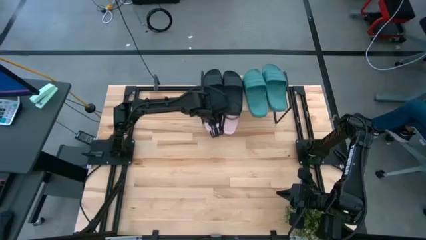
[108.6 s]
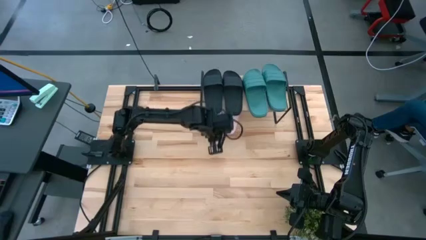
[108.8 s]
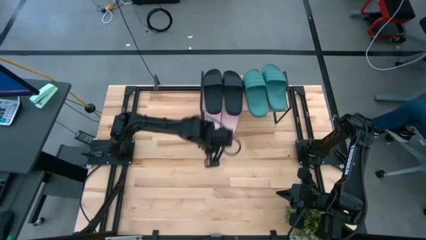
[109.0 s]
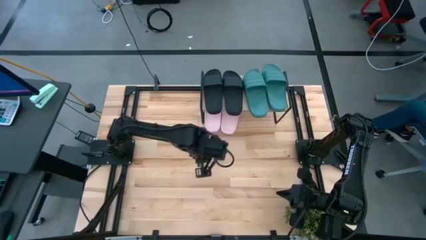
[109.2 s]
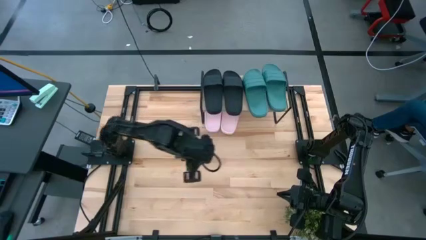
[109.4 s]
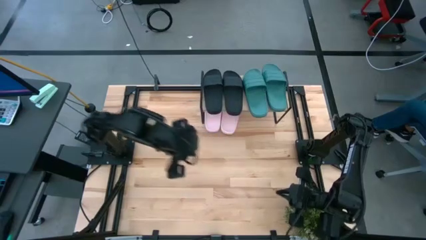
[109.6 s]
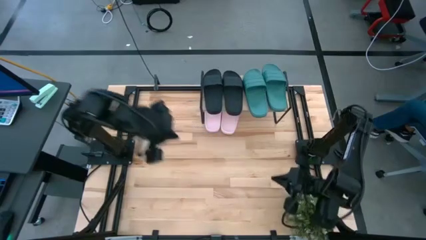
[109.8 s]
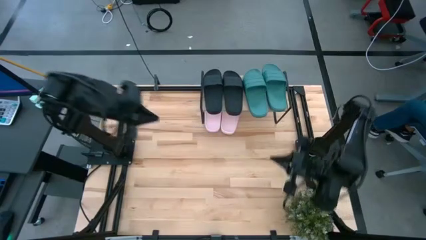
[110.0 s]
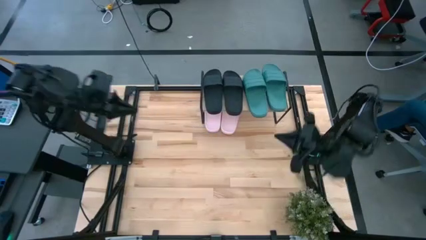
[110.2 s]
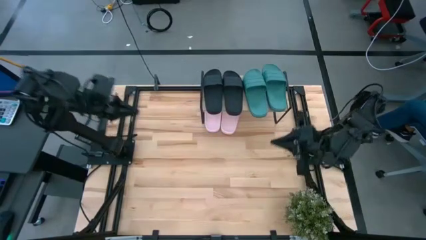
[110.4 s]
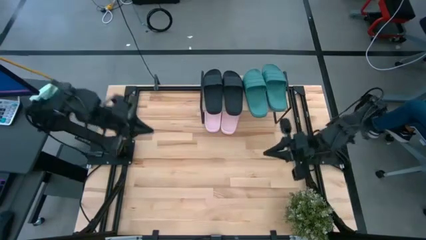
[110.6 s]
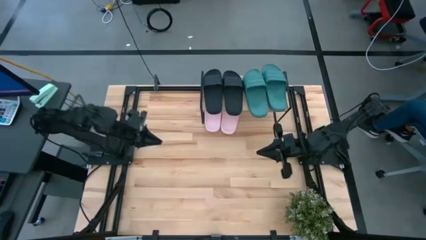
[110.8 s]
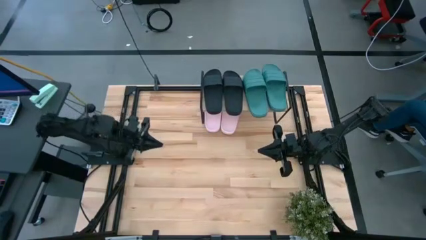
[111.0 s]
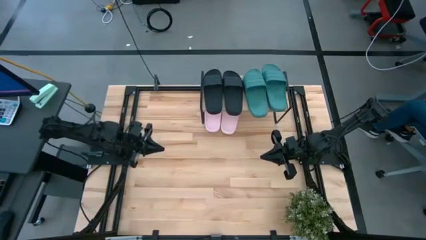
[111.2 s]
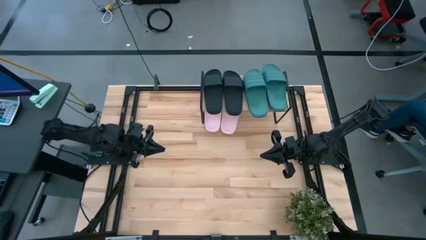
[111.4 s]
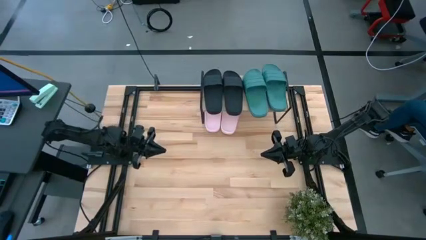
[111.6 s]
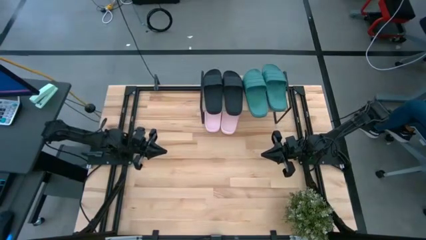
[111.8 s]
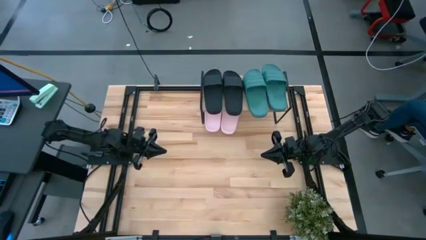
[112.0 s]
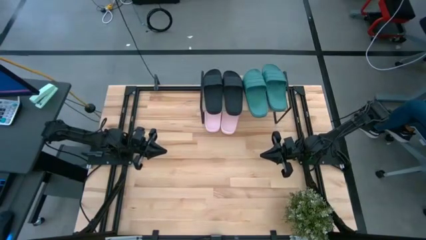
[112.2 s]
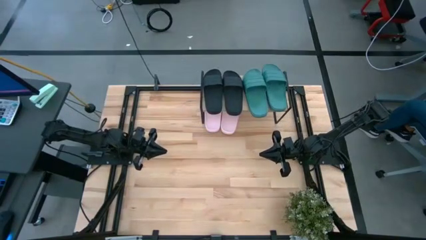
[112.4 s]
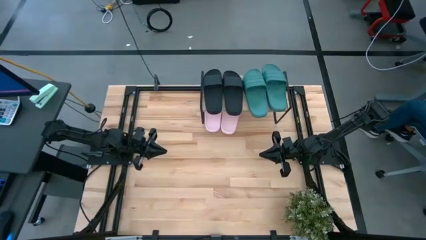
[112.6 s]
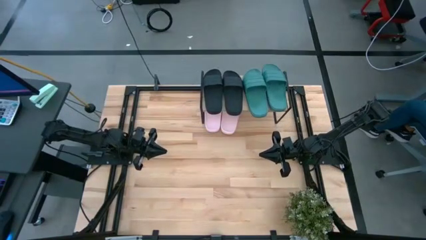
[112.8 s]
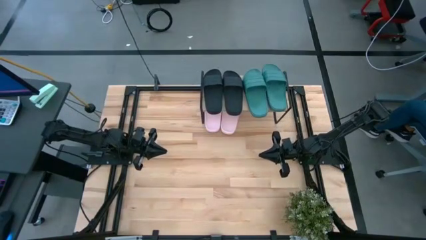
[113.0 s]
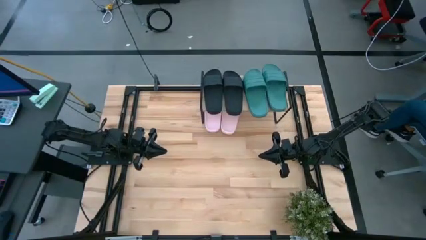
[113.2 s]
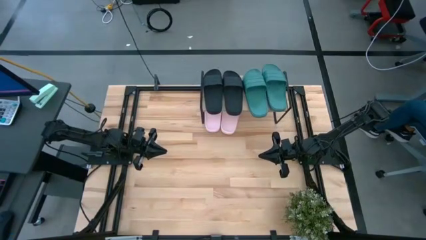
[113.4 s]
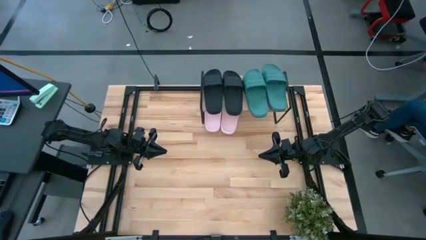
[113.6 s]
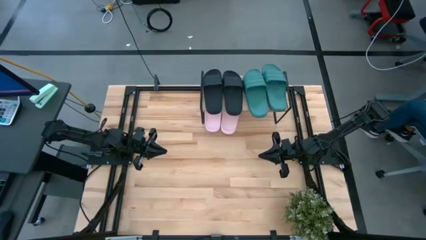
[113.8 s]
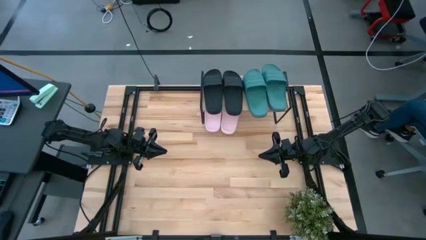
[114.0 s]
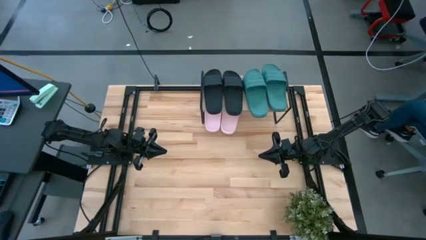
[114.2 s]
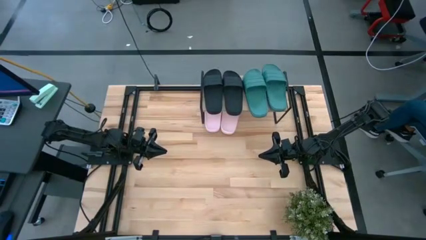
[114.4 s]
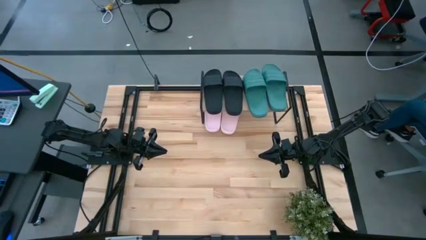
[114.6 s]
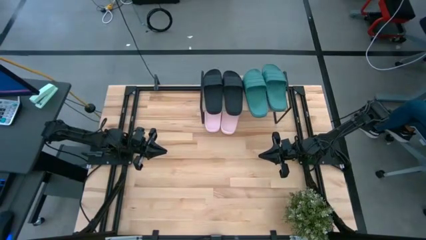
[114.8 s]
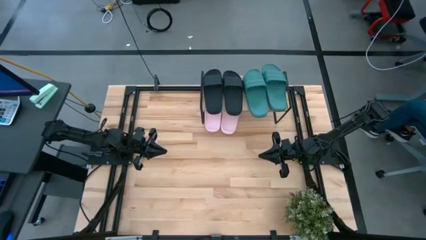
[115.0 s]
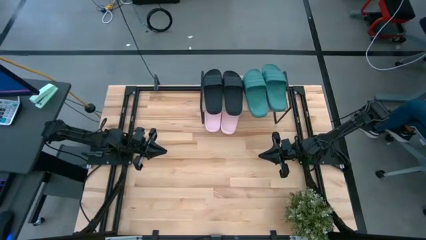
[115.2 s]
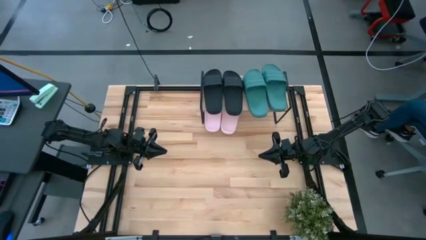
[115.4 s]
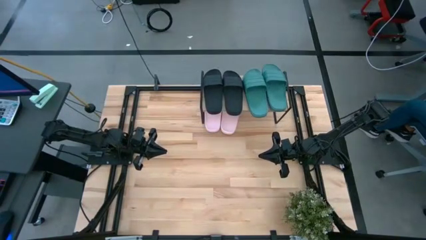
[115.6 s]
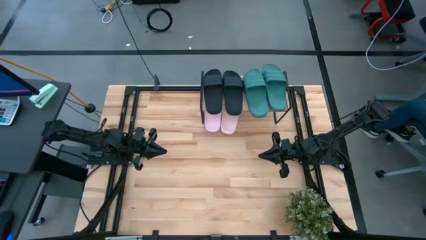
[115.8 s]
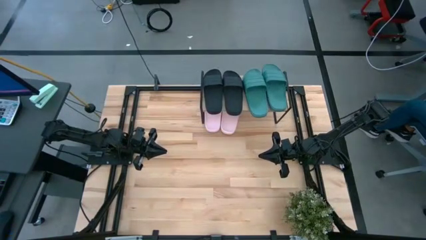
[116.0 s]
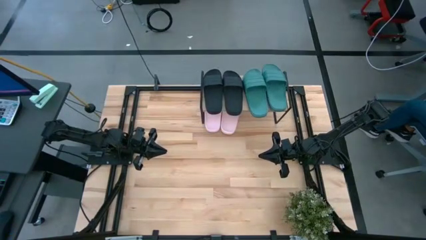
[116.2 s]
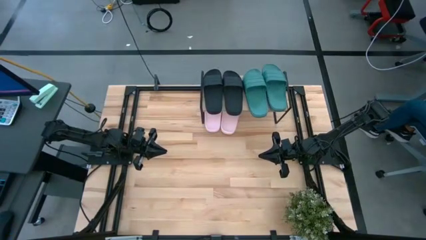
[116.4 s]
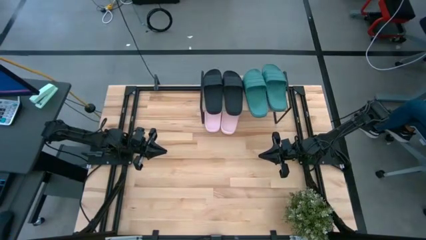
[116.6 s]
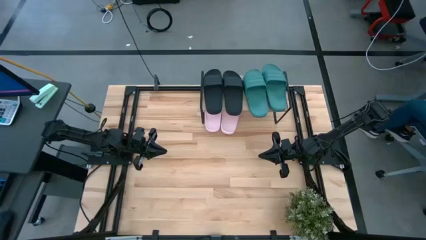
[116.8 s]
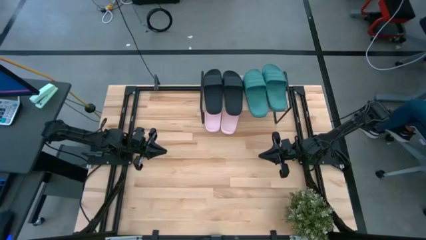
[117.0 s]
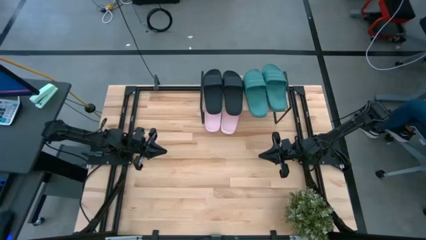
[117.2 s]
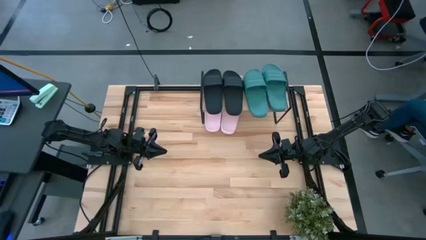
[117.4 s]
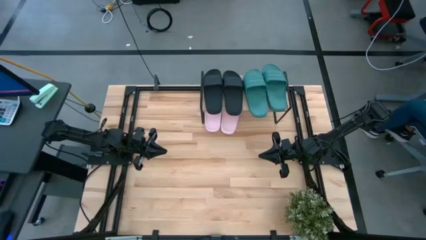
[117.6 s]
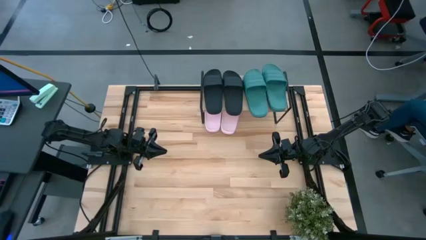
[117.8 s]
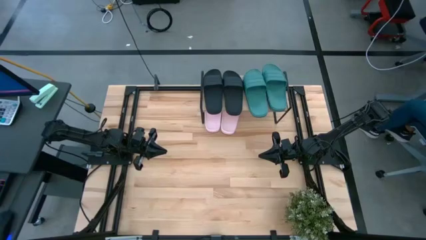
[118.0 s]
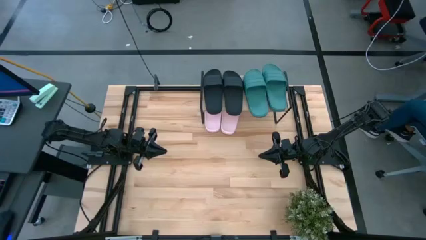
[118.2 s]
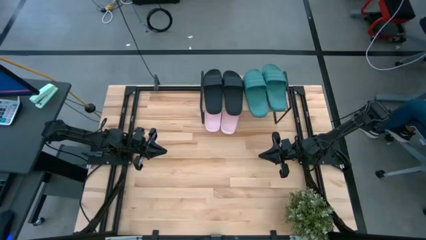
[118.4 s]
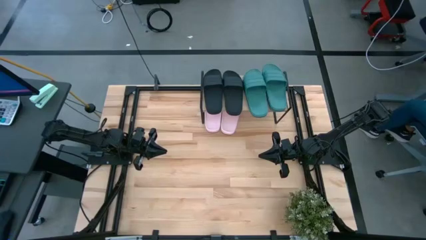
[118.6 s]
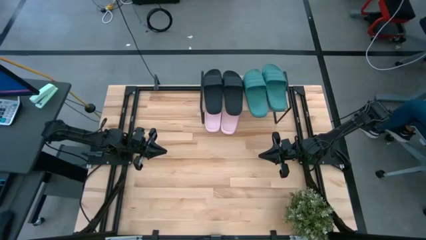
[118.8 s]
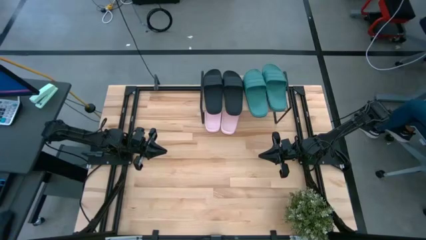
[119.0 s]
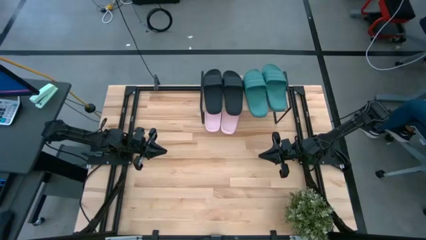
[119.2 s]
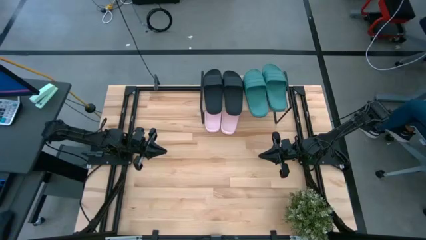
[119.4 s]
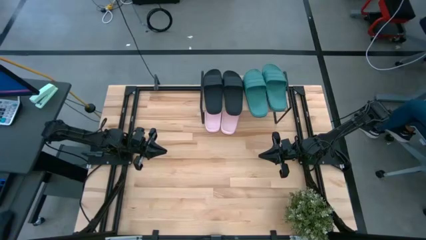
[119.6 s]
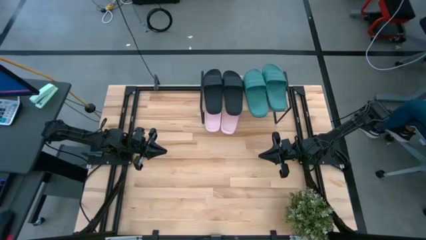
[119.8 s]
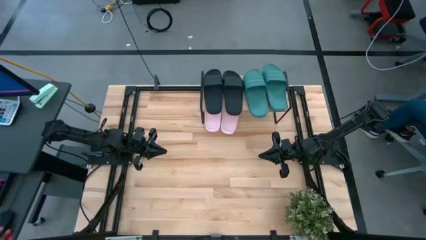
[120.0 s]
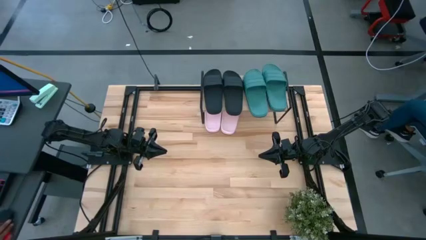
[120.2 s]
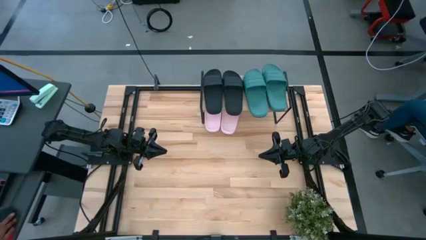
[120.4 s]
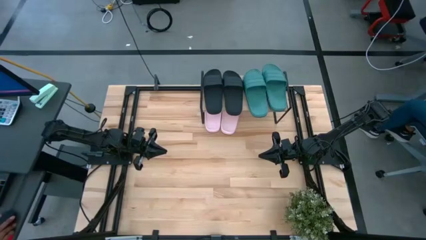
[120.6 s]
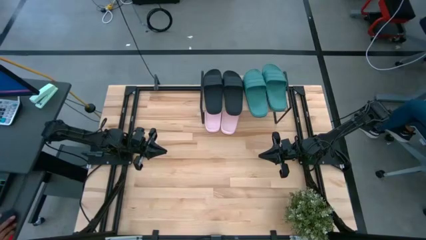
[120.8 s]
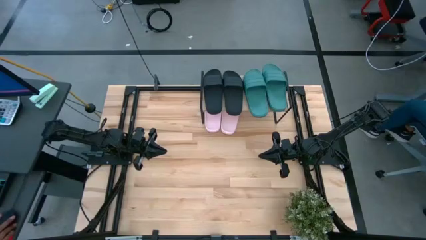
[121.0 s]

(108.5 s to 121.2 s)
Task: Pick and place slides into the shelf
Return to Home Position

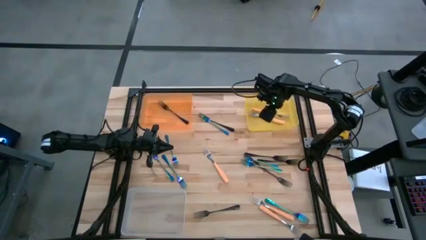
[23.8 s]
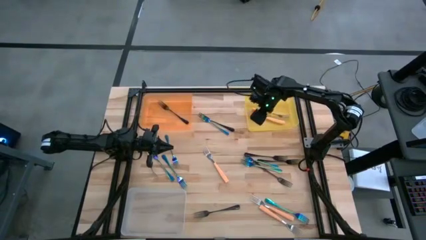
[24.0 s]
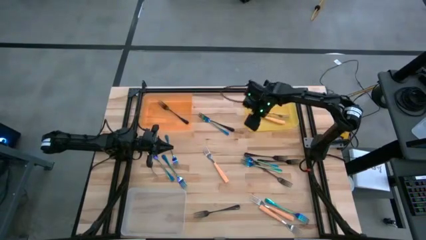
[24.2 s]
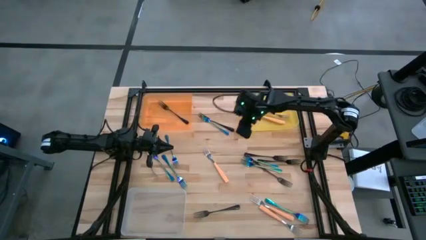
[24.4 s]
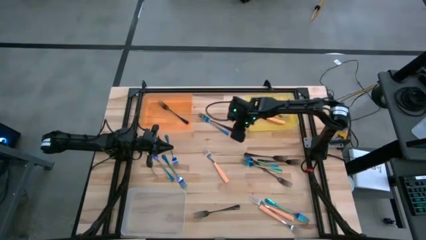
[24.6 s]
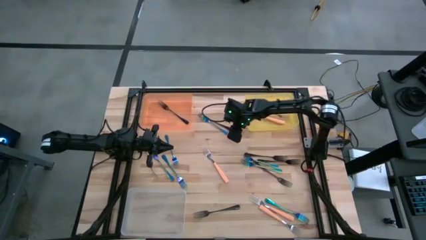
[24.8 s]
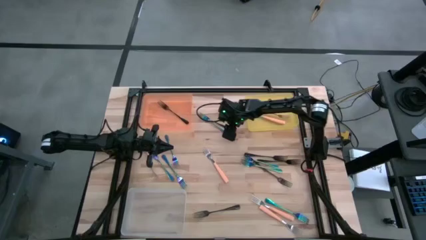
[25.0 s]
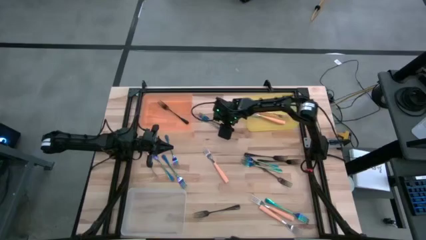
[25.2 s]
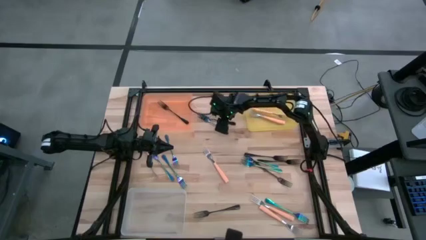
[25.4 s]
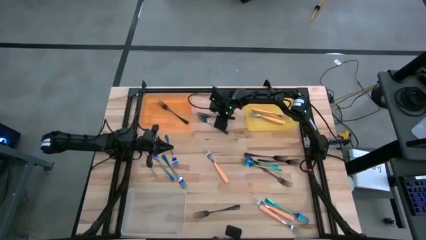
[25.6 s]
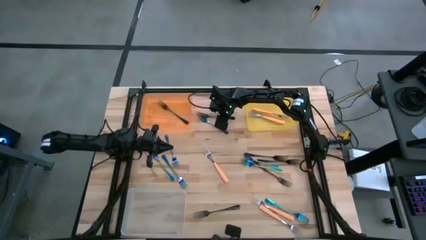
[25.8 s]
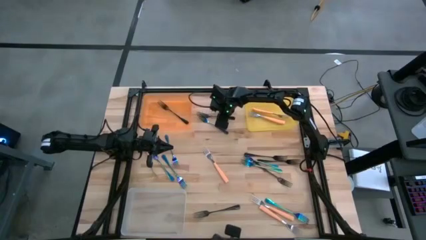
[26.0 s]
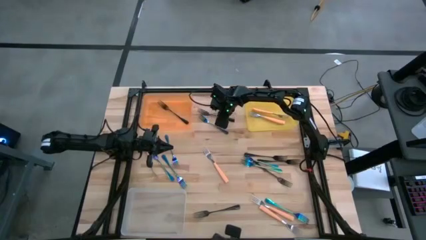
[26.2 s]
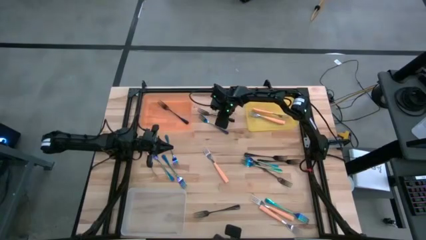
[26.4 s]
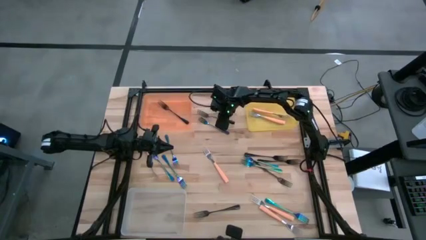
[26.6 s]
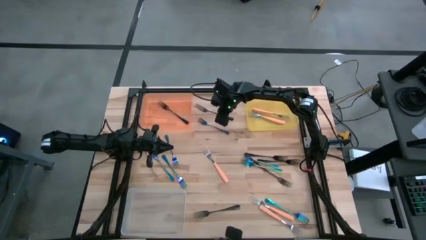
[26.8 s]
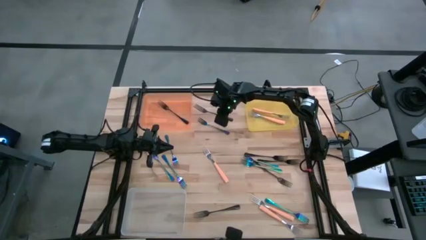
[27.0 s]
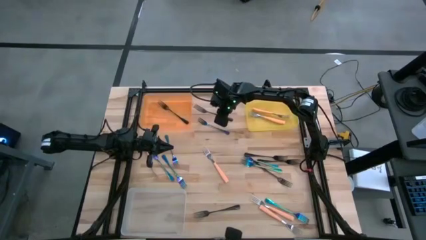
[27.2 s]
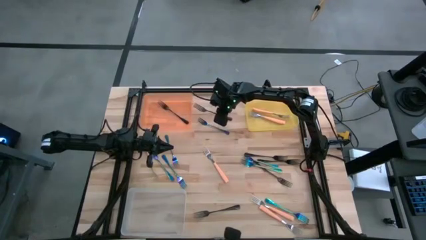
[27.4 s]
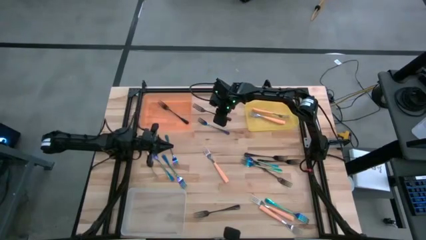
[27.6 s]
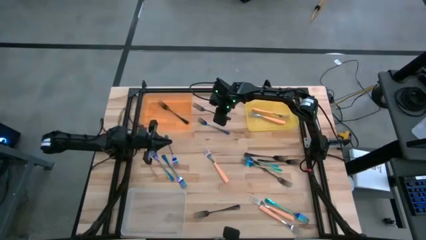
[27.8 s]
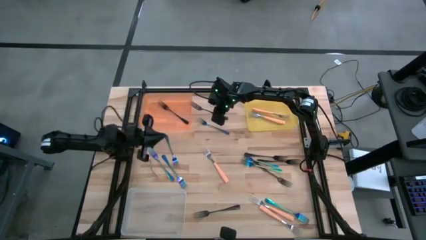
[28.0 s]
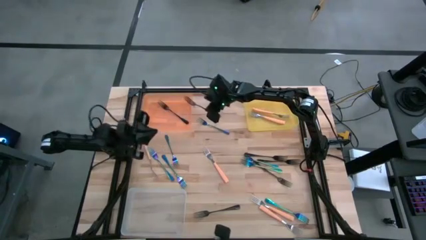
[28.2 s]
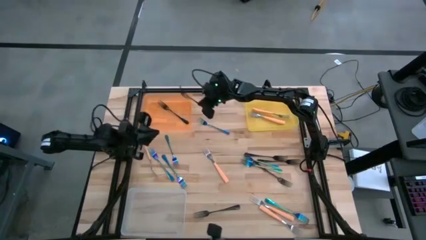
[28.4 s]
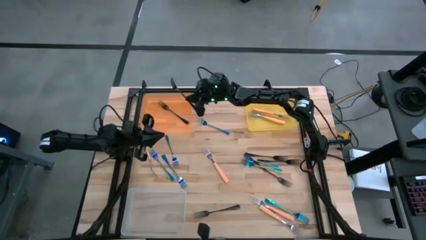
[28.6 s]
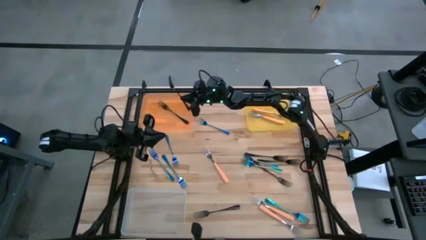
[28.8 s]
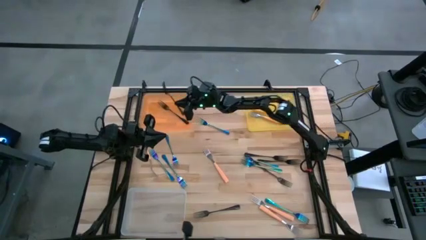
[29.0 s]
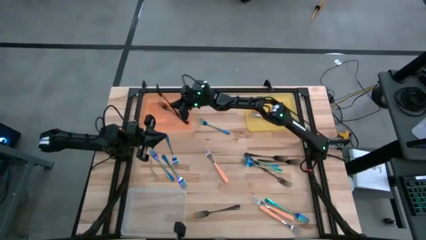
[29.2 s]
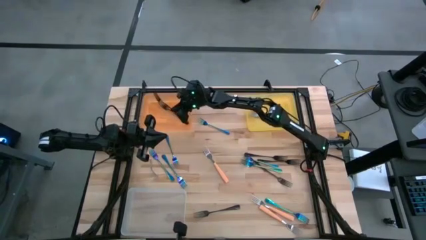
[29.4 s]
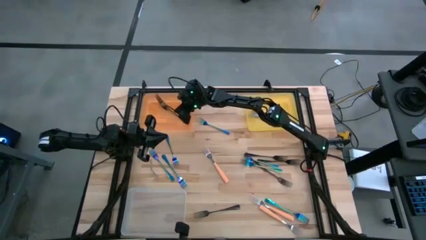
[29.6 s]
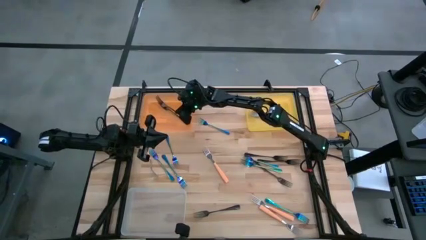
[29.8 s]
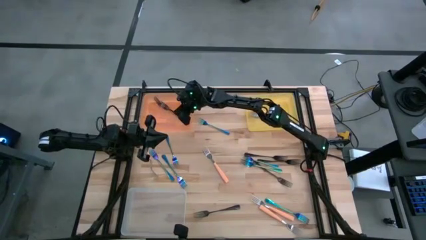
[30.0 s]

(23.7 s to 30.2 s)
Task: Sort silverware by color (type)
Put the black fork into the orange bin
